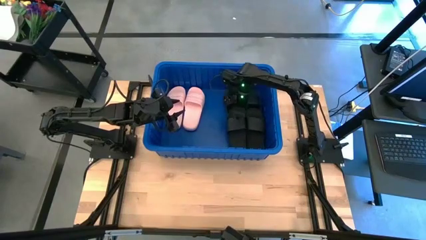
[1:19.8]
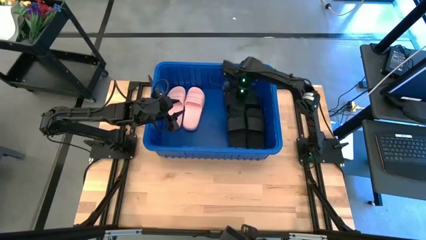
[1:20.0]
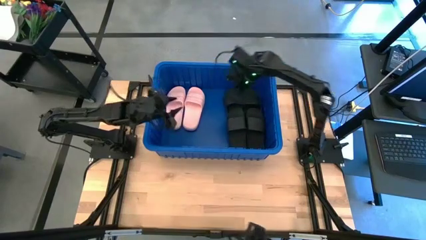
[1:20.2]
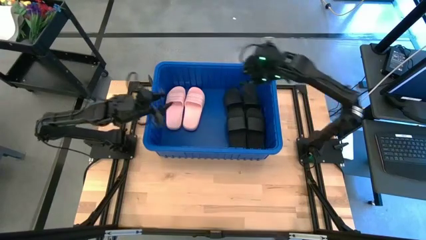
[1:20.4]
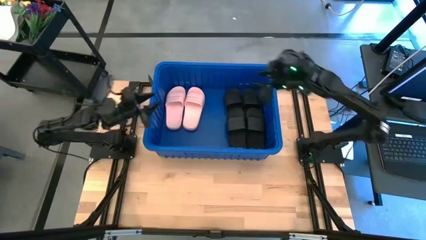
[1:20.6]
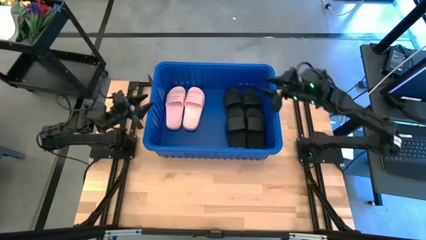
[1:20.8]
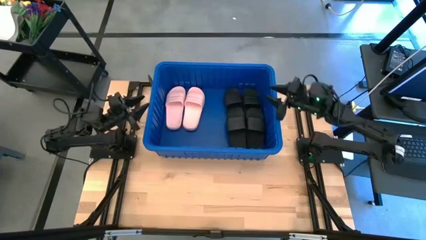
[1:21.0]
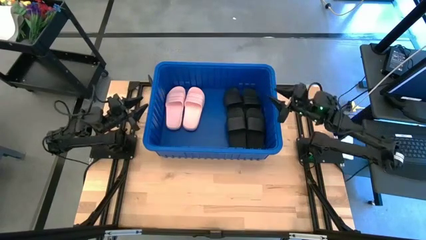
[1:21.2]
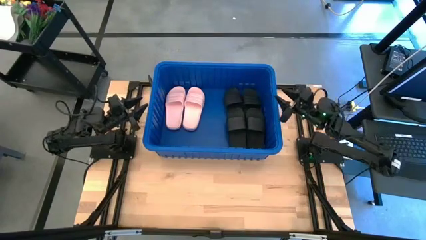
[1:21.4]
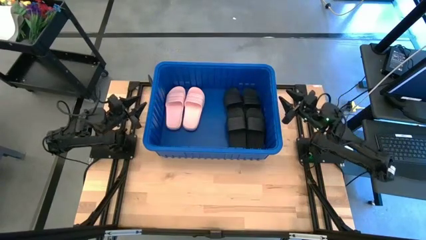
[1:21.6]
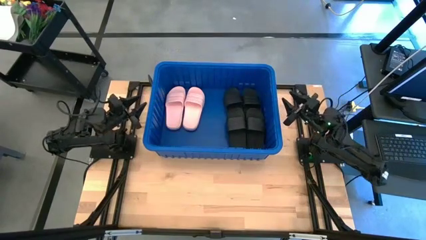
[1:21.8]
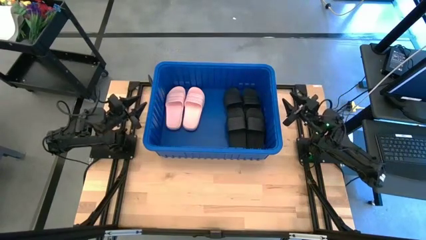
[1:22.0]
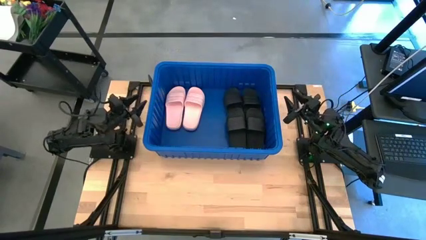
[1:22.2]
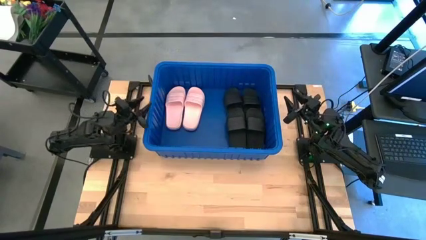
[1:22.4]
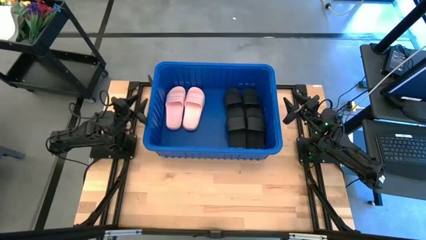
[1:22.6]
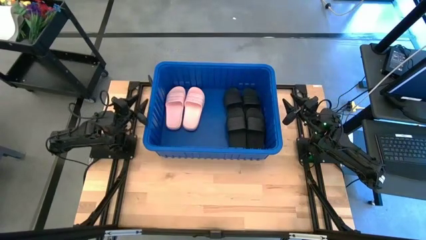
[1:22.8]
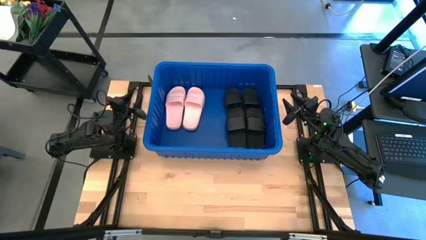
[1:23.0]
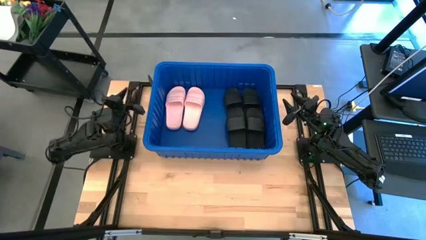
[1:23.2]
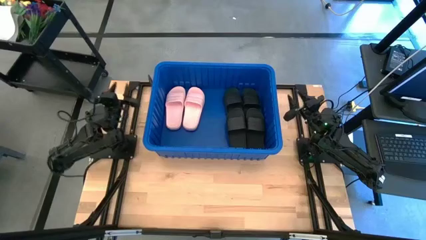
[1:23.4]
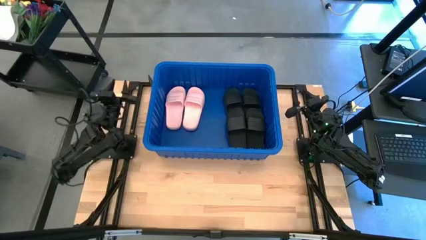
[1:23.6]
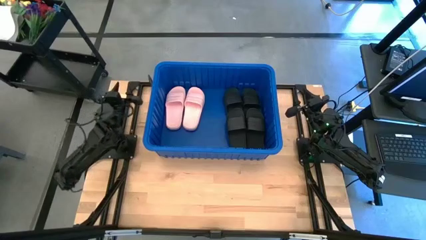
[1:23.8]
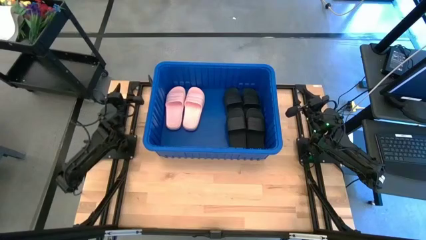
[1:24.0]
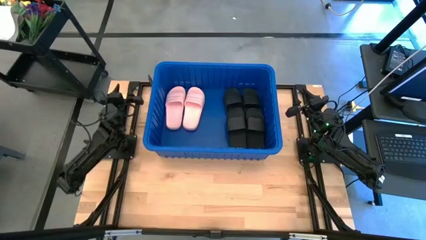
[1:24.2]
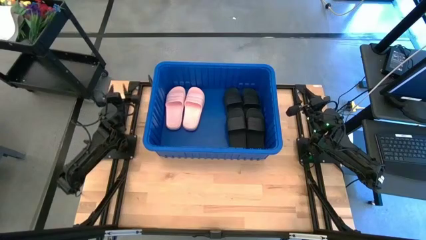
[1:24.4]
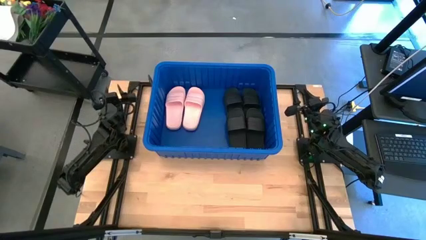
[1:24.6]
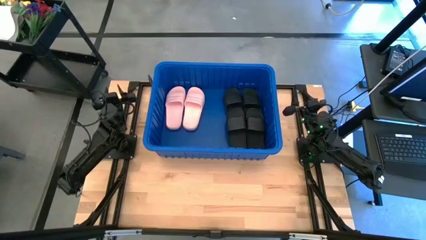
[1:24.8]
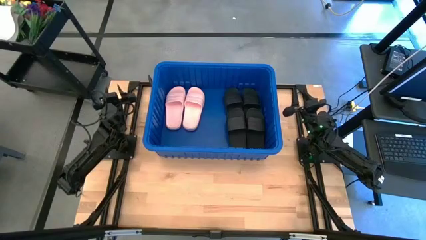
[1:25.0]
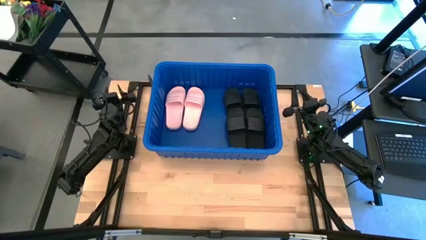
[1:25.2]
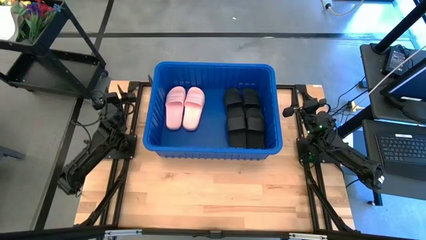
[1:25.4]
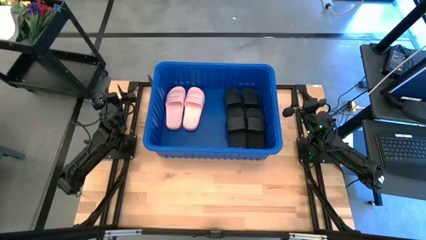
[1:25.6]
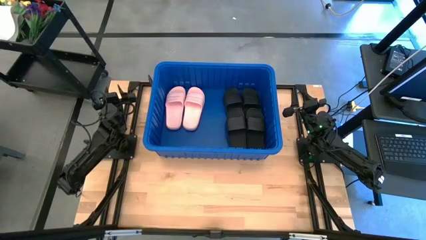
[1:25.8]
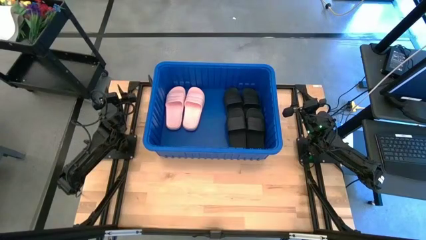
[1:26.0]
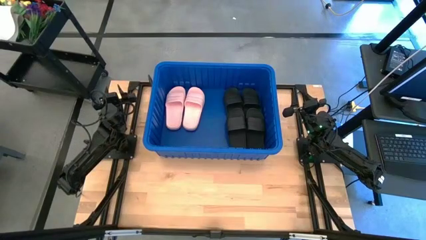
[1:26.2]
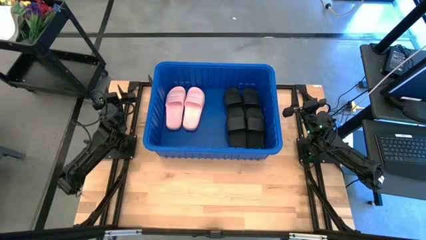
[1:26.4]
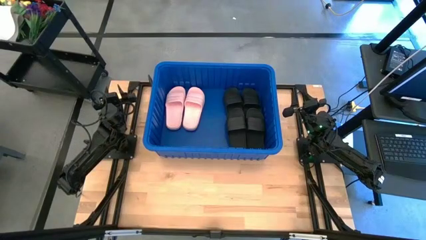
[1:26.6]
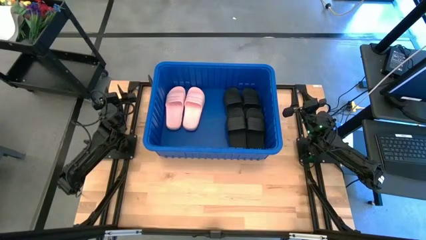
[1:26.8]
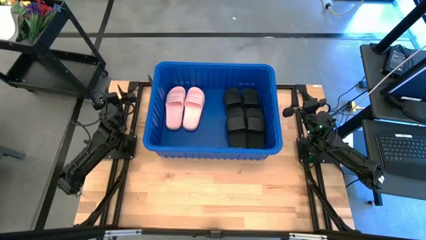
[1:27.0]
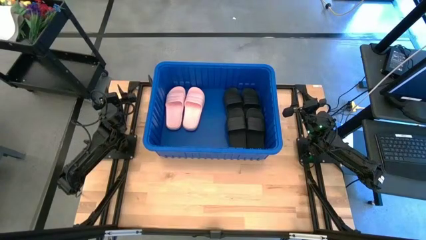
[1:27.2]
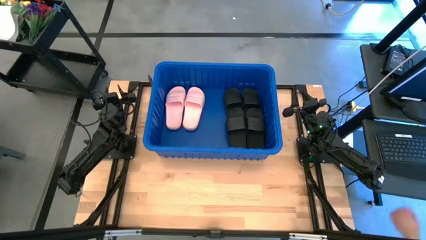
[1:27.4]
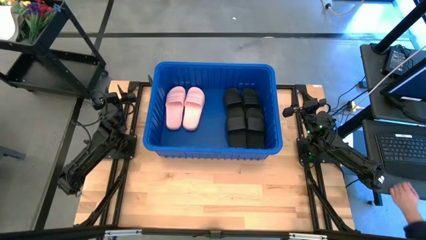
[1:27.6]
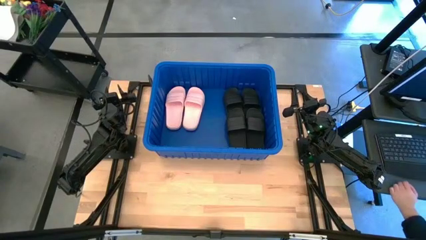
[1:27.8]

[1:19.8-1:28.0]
Task: Pick and place slides into bin
Return to Home Position

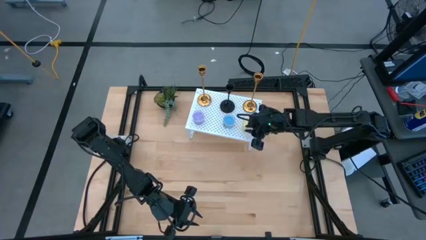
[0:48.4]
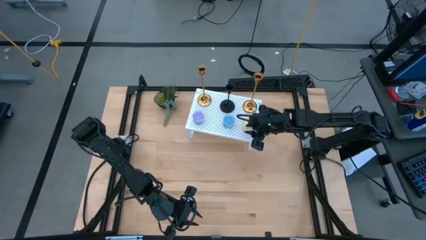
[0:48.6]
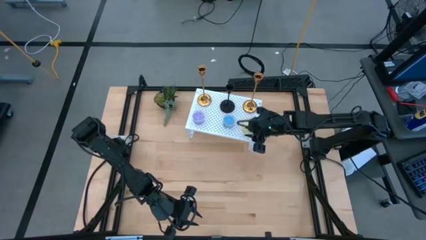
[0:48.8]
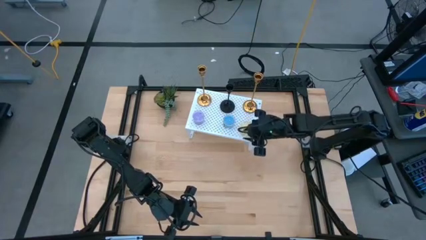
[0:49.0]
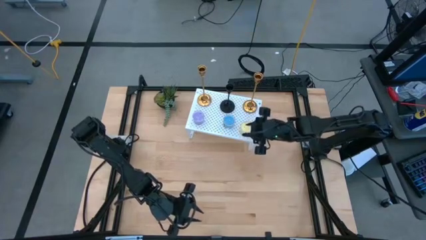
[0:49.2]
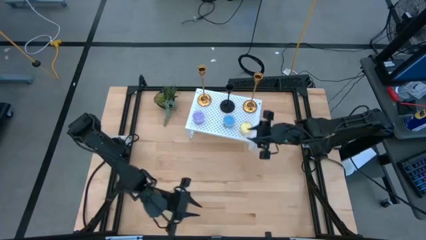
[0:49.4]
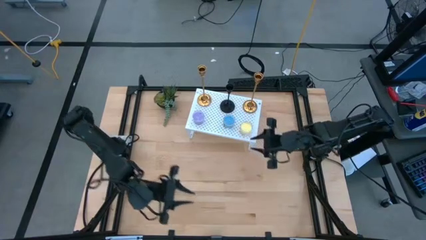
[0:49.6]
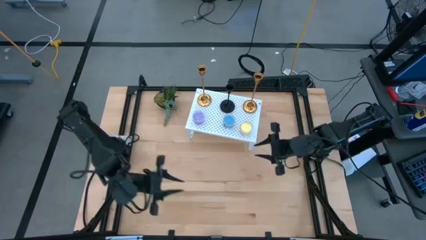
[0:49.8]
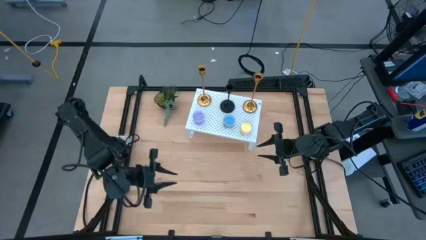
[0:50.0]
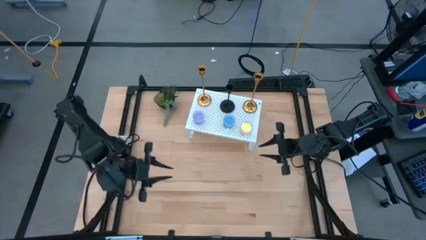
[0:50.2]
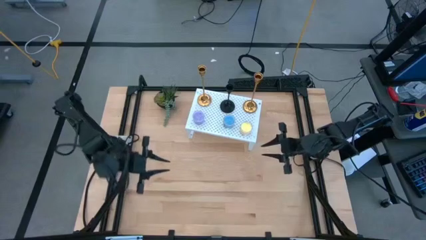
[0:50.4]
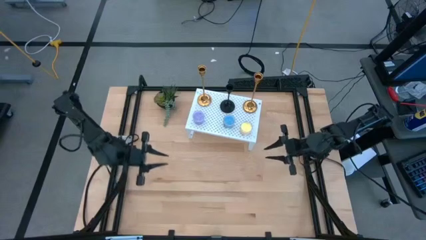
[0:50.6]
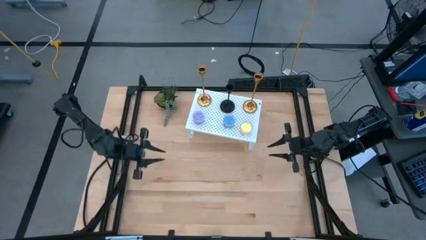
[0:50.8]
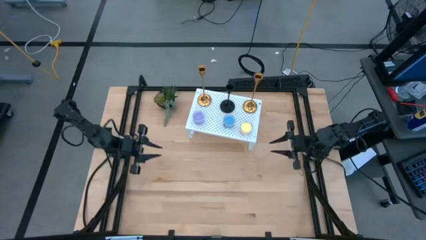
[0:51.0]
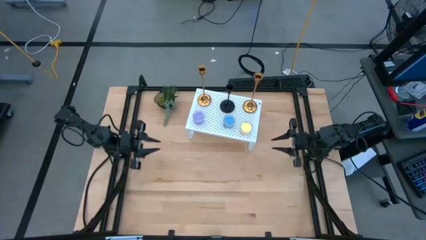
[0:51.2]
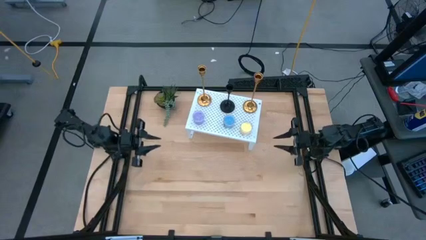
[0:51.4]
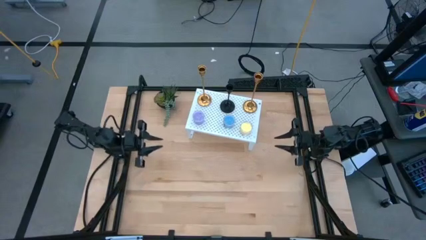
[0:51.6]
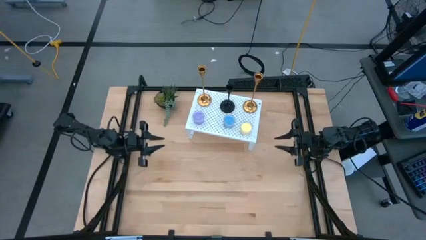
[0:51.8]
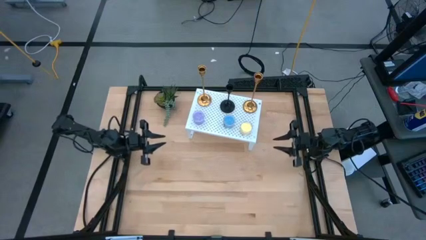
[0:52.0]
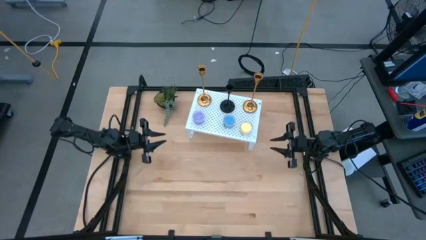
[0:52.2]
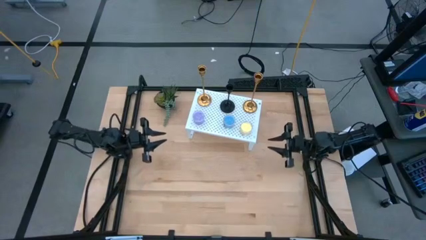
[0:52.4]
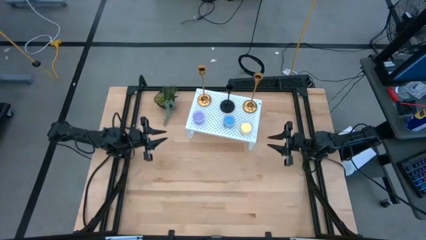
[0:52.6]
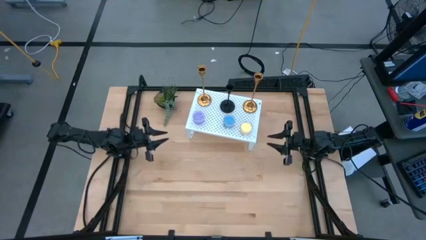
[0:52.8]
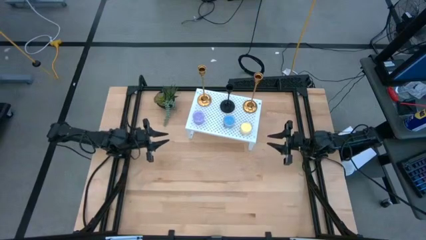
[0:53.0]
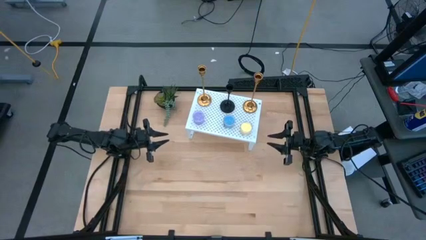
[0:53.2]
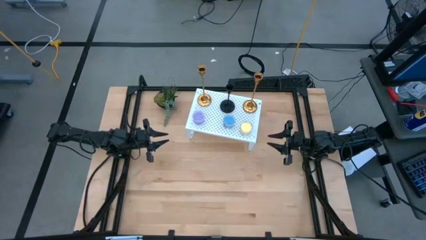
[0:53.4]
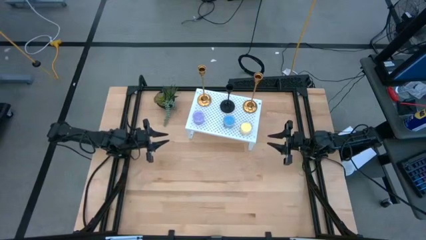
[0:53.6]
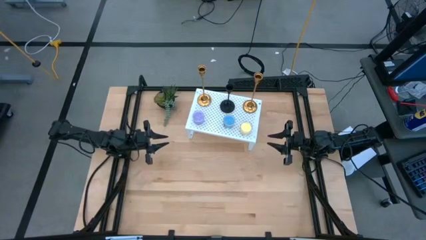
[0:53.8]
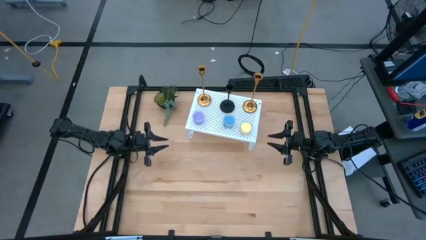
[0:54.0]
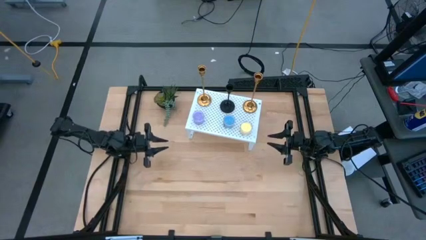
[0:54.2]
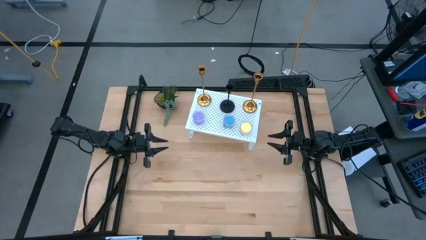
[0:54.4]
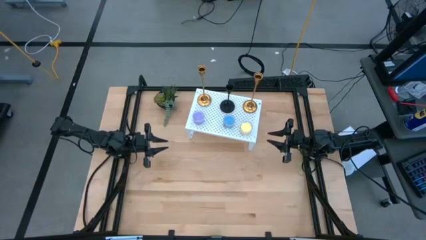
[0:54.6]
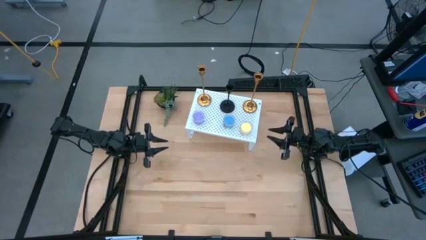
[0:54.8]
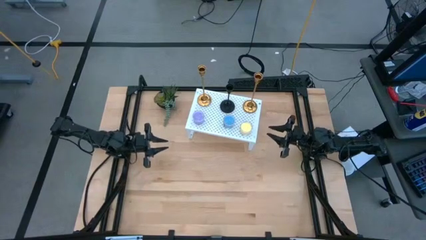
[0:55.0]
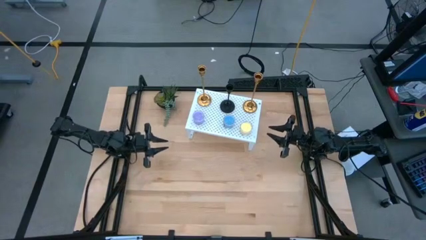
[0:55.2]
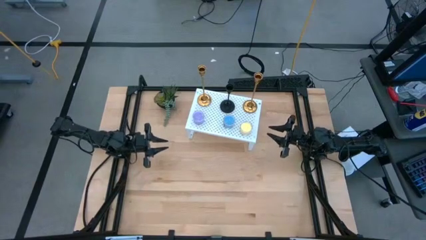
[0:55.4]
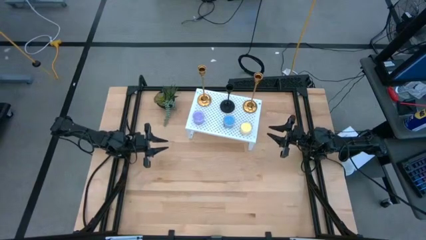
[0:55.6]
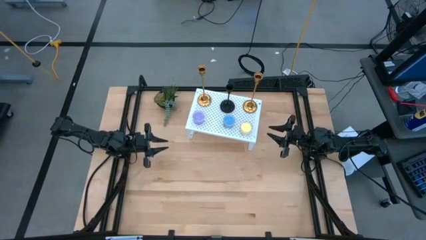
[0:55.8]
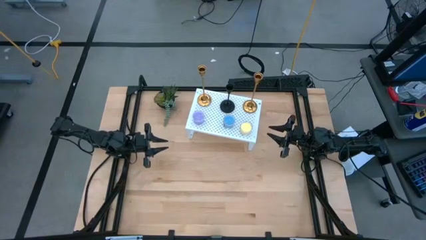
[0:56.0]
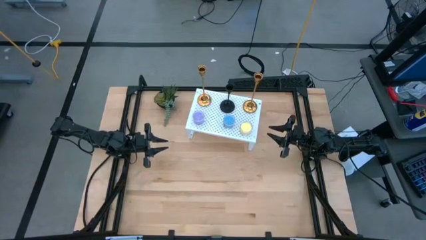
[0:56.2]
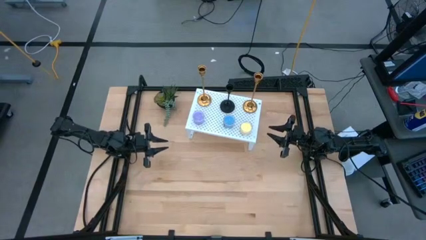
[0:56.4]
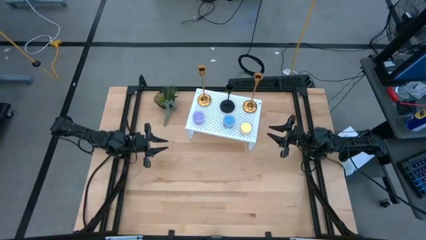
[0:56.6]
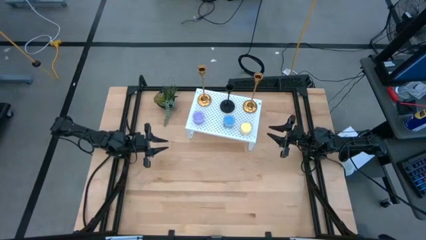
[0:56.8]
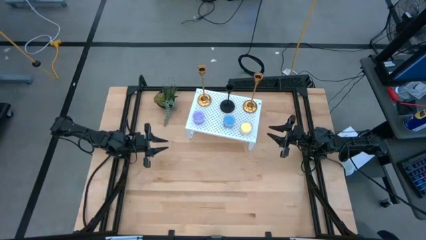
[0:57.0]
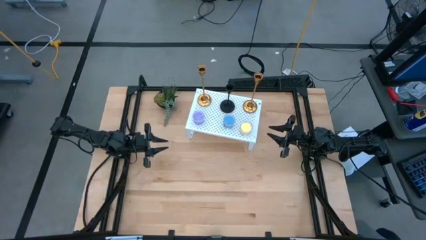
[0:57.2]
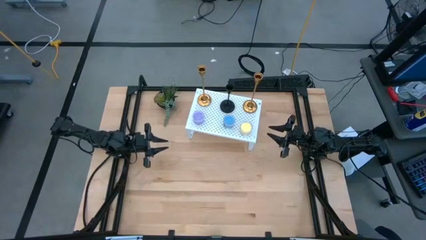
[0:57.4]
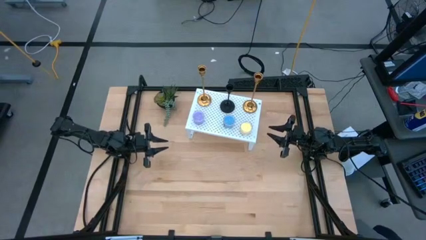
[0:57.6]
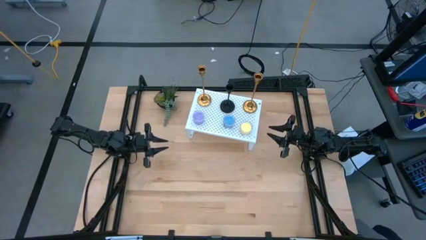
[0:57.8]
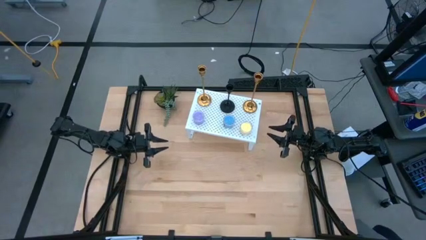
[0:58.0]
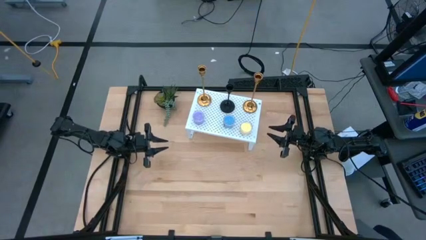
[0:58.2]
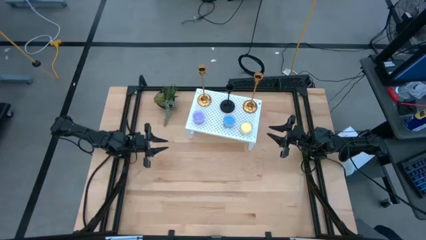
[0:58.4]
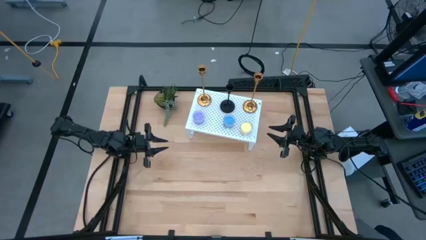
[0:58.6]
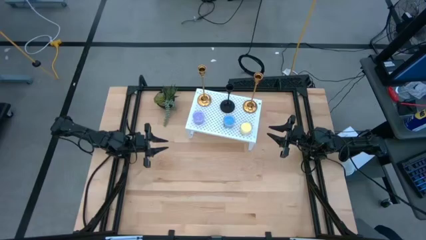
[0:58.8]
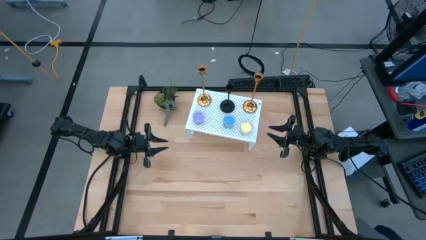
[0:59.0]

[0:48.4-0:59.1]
Task: Pick & Place candle stick holders
Return to Home Position
